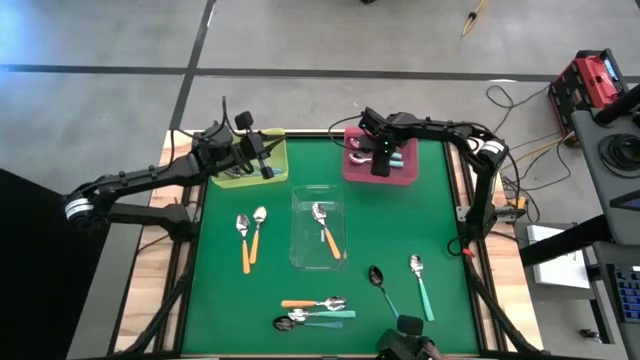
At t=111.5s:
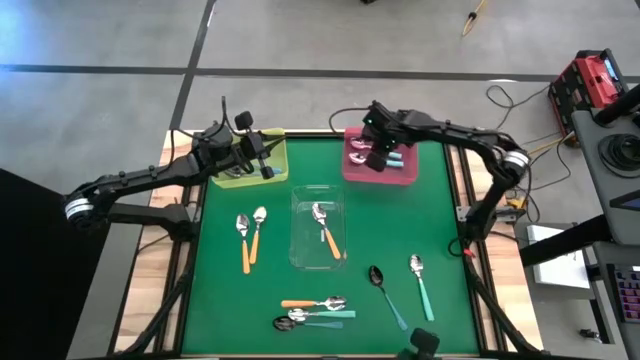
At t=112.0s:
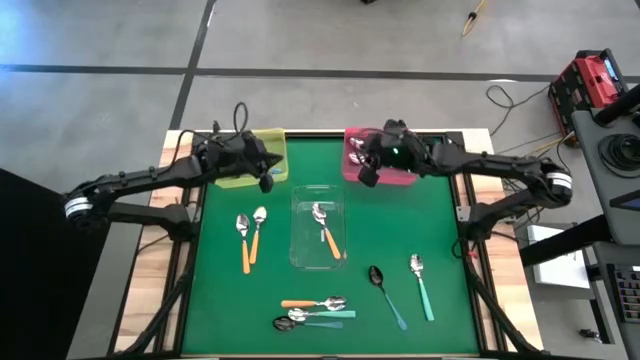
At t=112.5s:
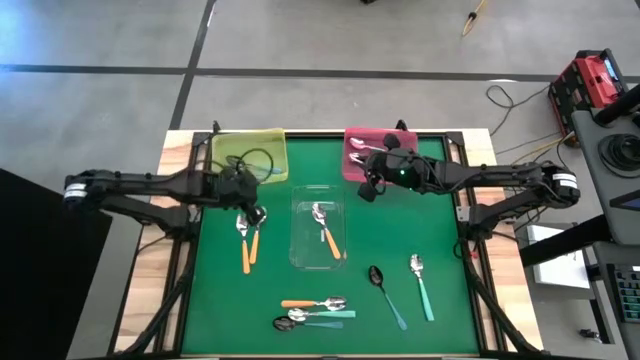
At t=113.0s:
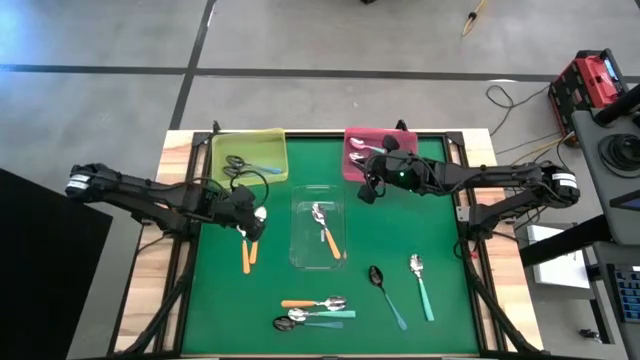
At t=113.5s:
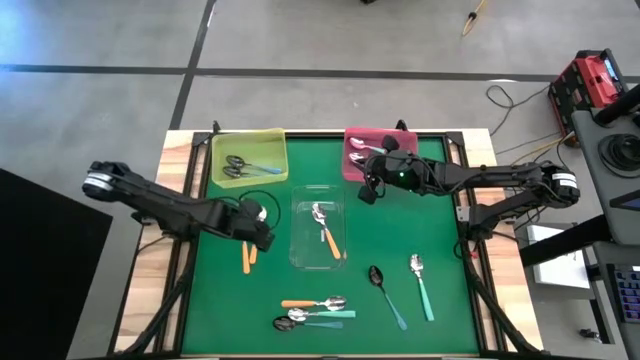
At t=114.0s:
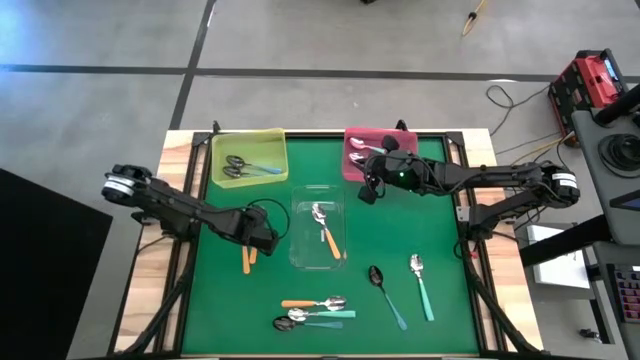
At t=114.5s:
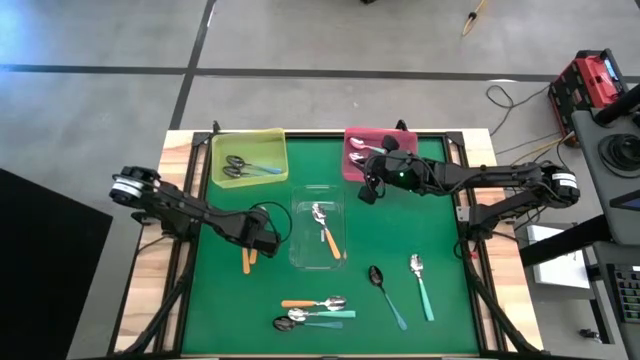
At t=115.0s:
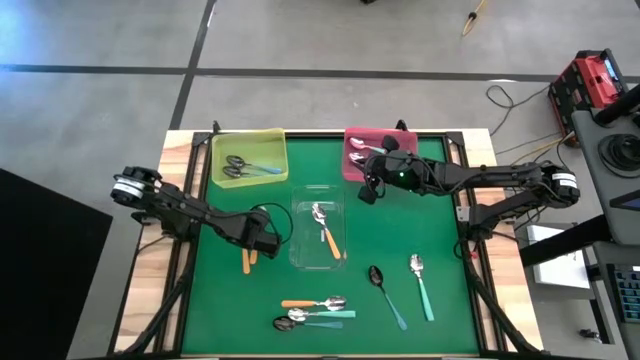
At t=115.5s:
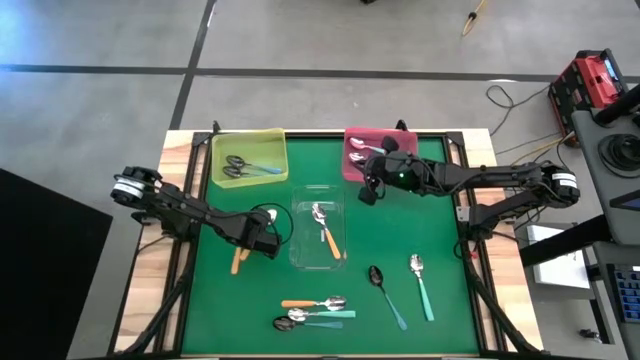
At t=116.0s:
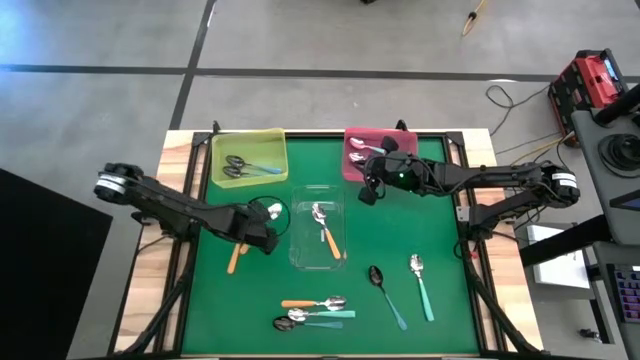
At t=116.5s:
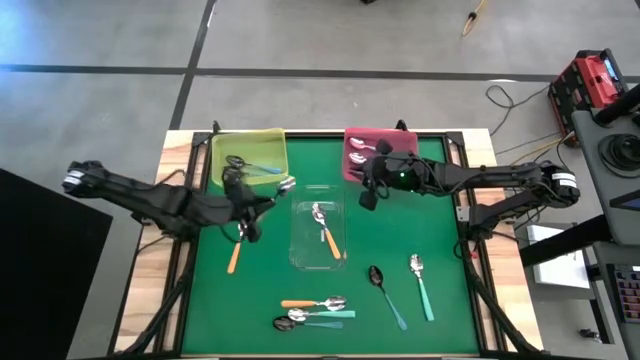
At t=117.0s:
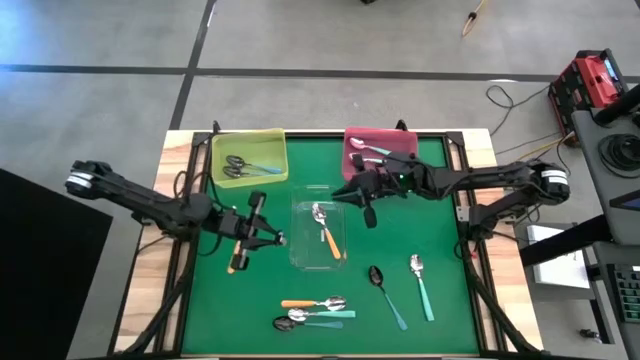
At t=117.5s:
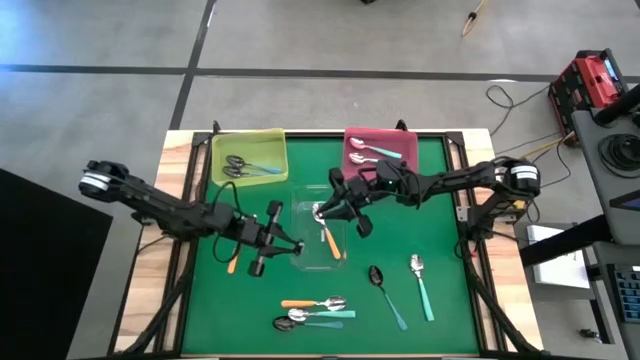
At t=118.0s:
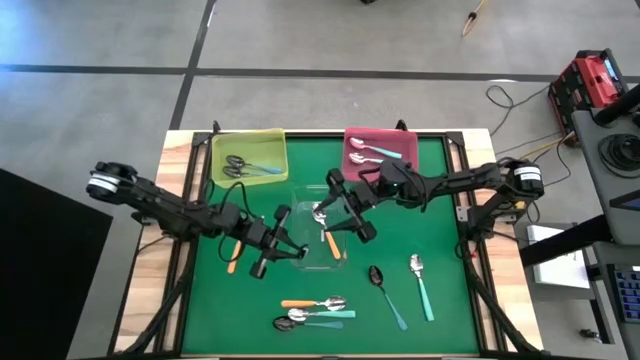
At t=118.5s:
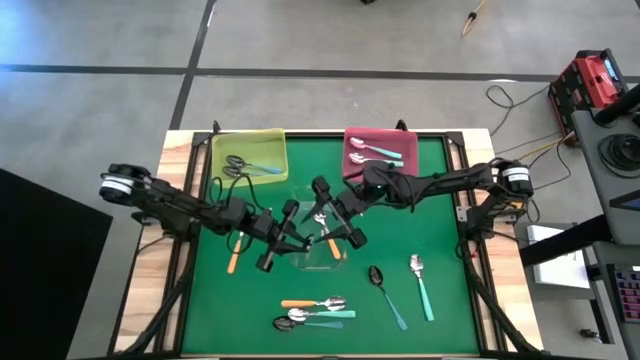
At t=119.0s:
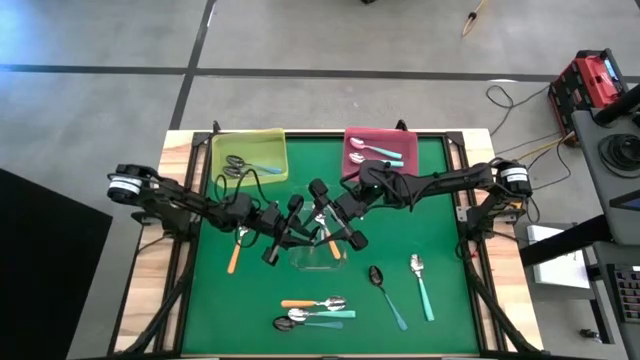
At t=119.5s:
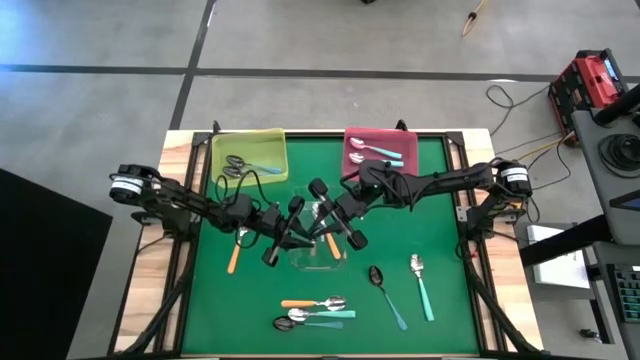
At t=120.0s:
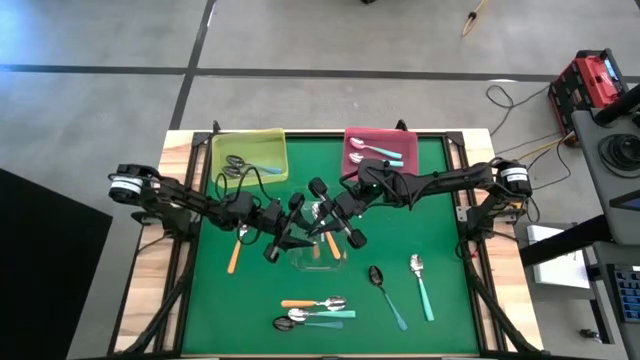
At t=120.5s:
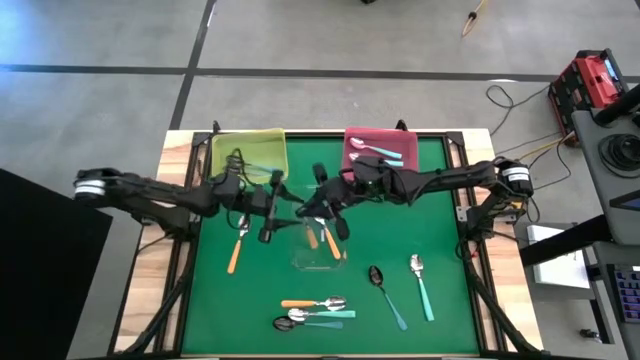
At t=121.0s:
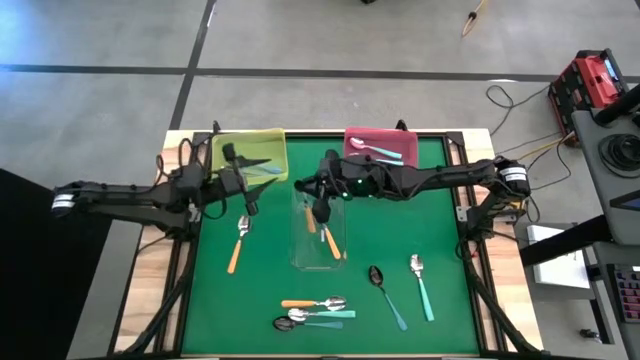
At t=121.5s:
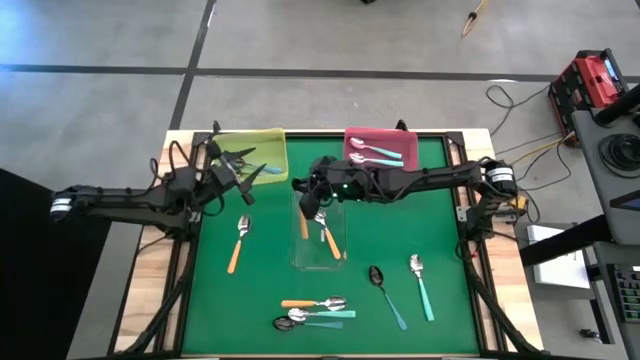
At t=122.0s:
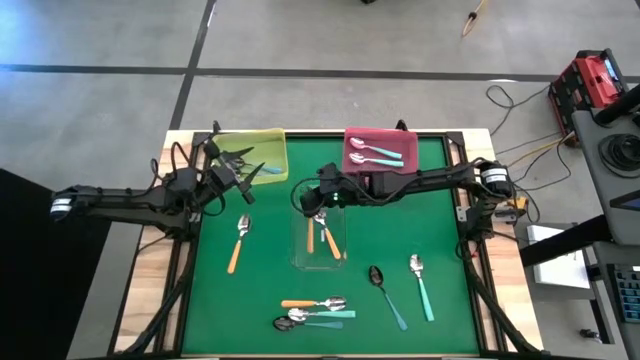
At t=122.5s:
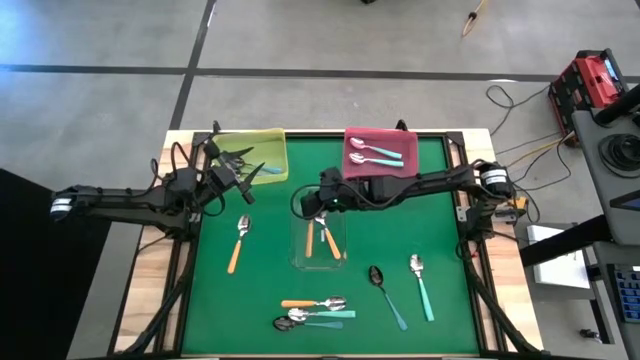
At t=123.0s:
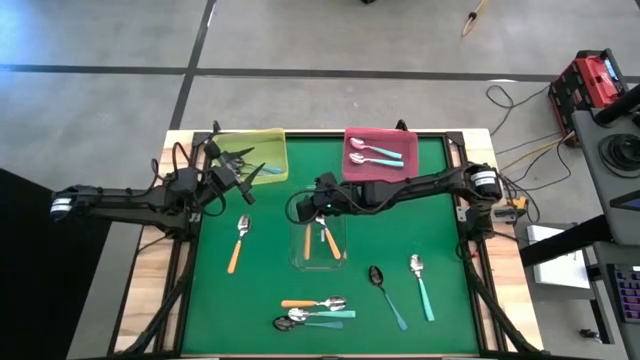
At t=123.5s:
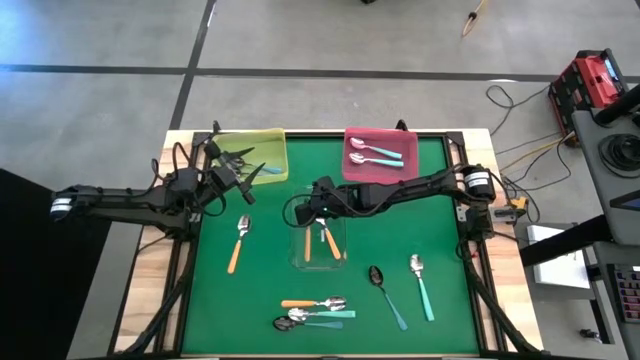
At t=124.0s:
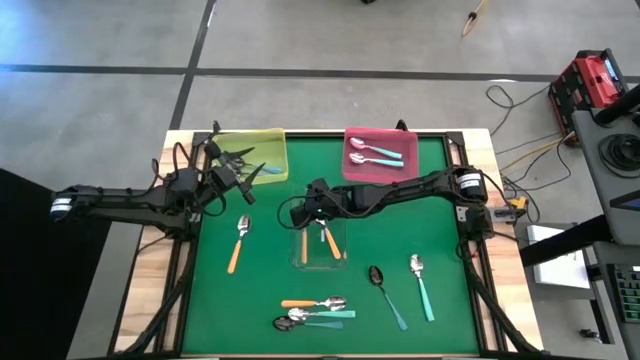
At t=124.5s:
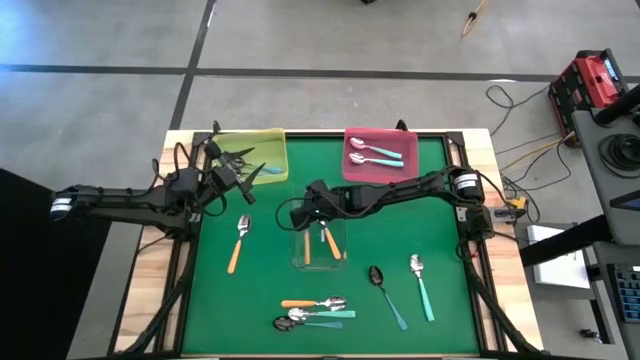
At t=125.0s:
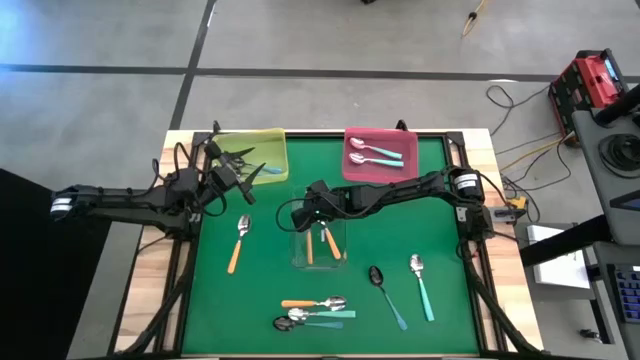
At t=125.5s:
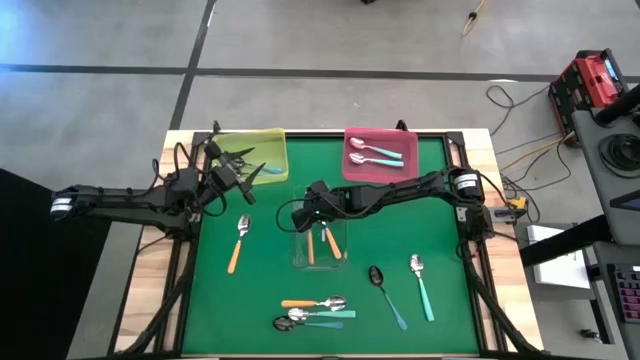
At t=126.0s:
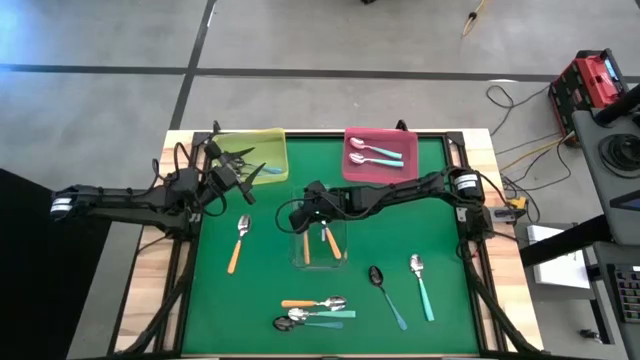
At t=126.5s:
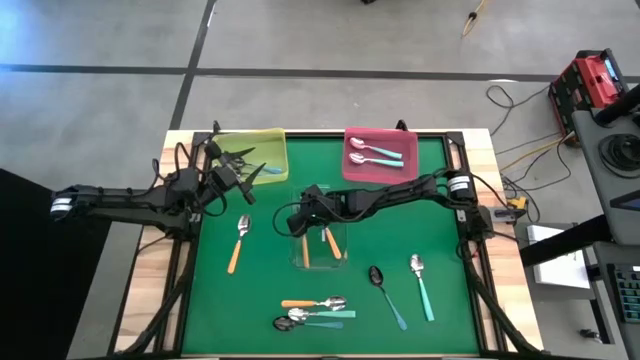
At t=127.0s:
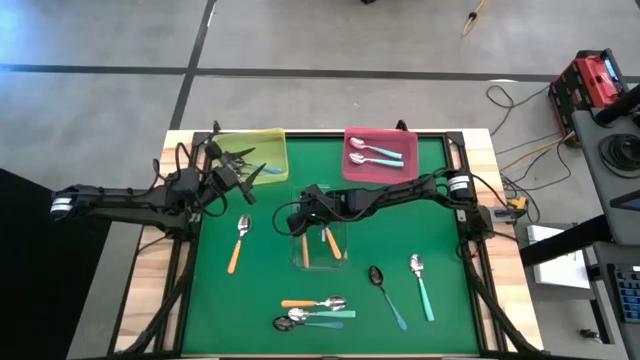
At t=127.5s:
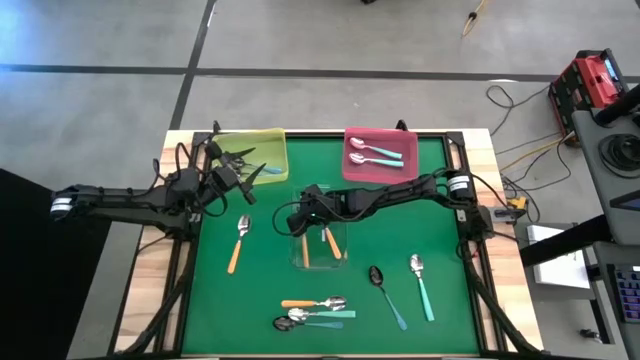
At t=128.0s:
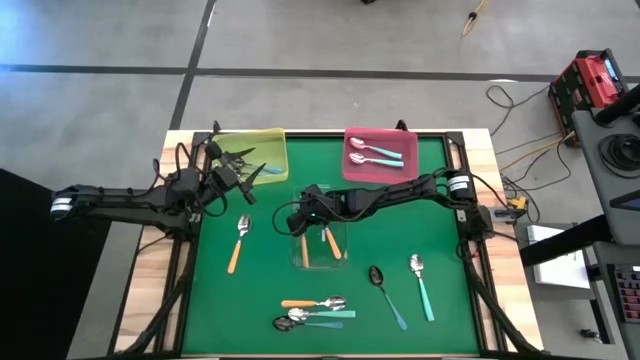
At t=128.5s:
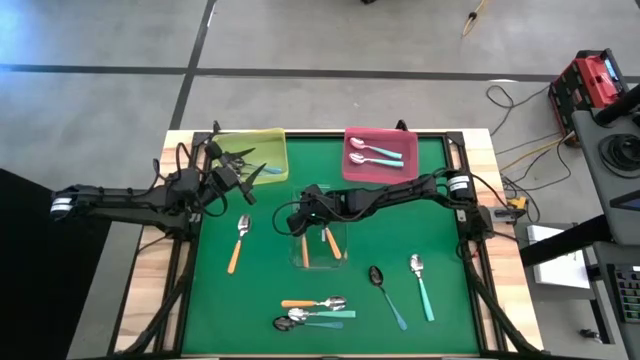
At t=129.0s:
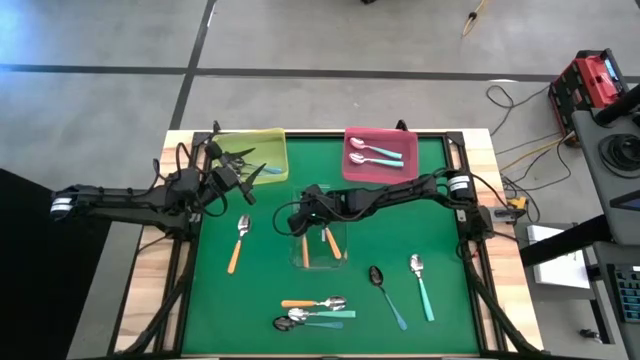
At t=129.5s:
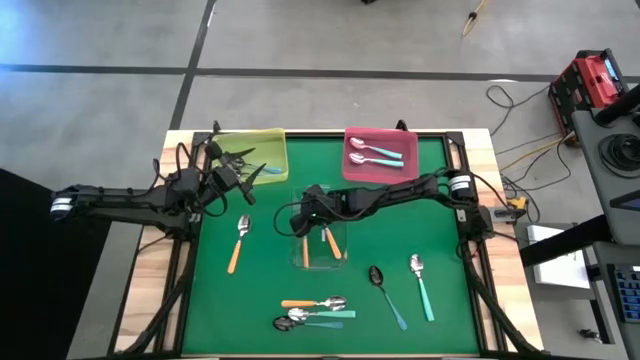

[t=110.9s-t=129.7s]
Task: Sort silverware by color (type)
Put the right yellow spoon into the transparent bin

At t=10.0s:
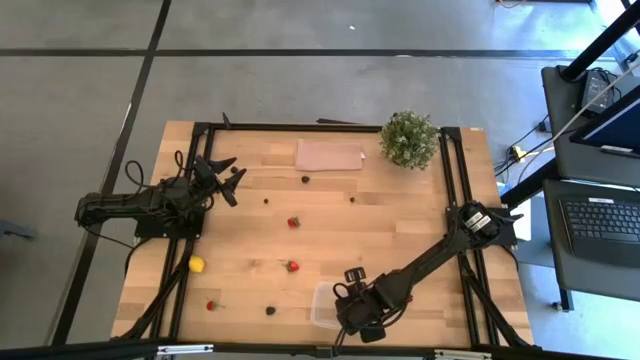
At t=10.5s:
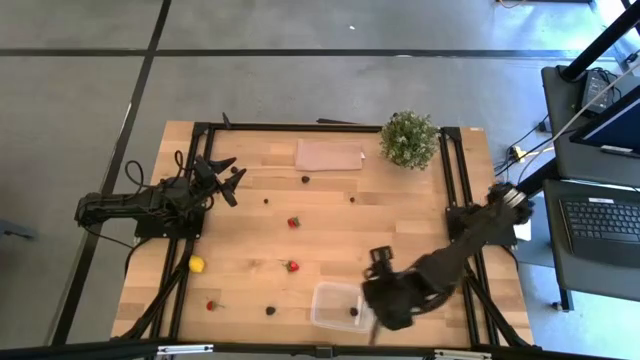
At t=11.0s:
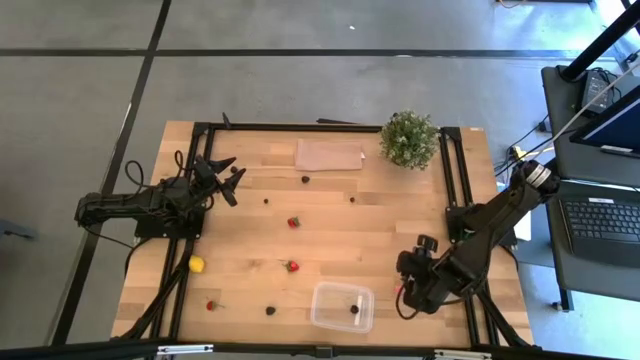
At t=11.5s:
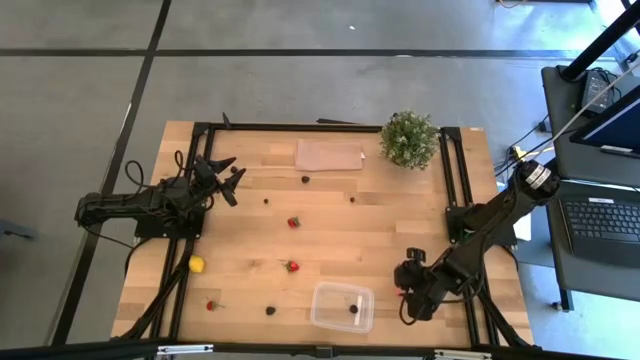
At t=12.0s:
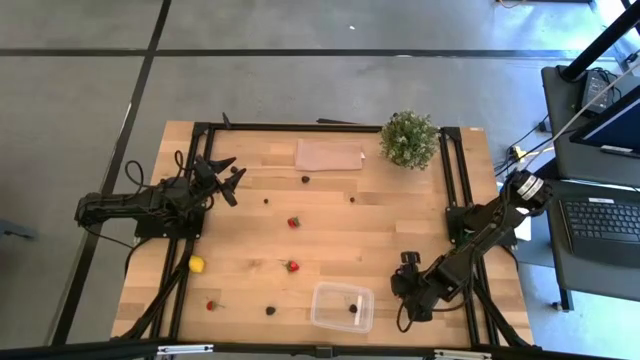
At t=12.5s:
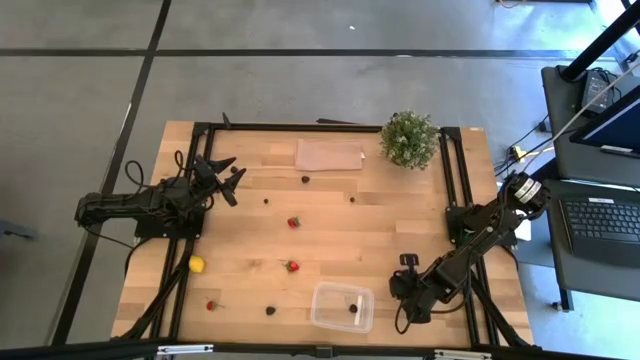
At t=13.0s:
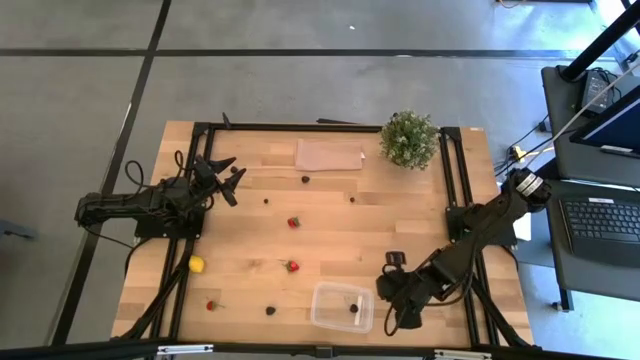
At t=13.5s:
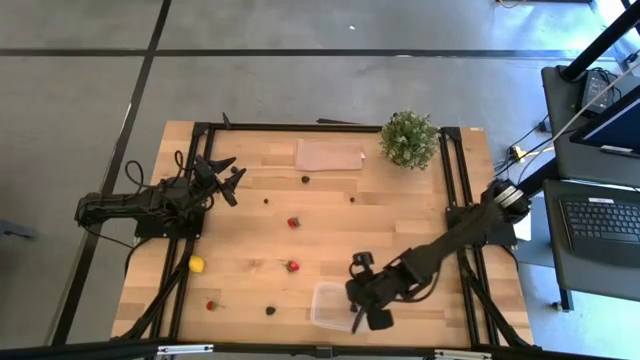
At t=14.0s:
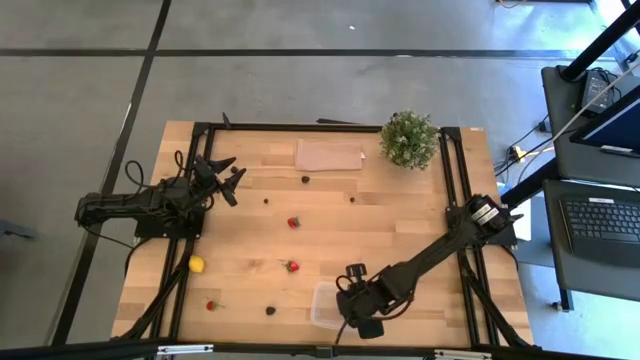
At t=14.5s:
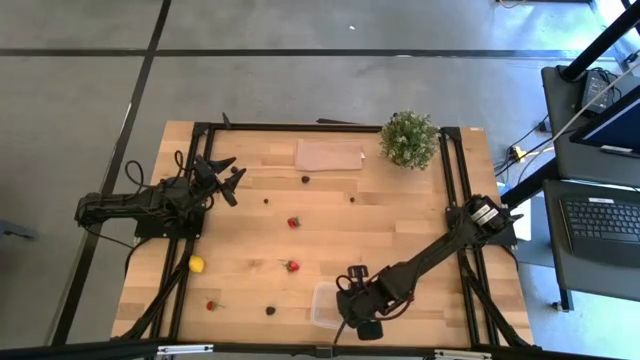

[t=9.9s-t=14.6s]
Task: Pick and placing Produce into tupperware
Put the peach into the transparent container
